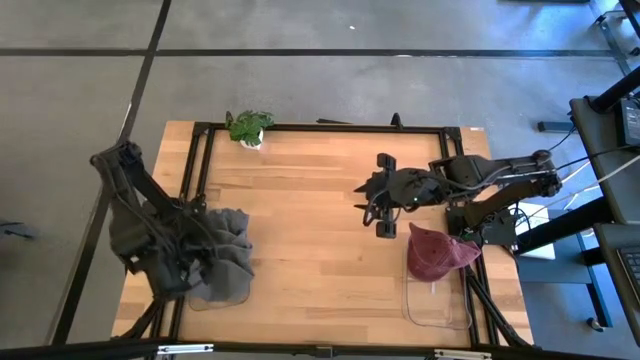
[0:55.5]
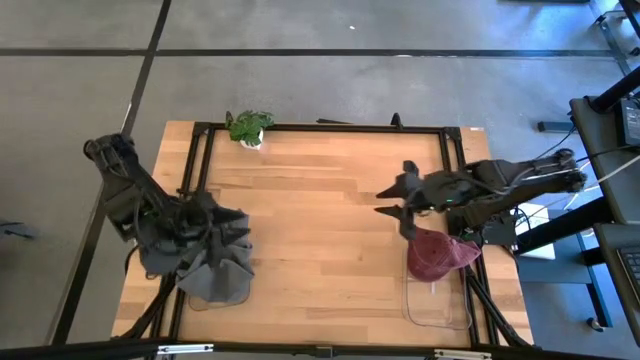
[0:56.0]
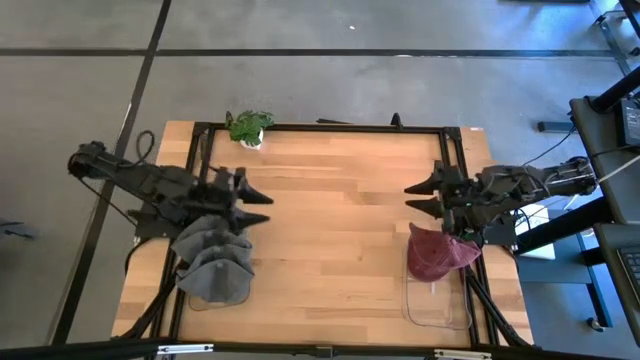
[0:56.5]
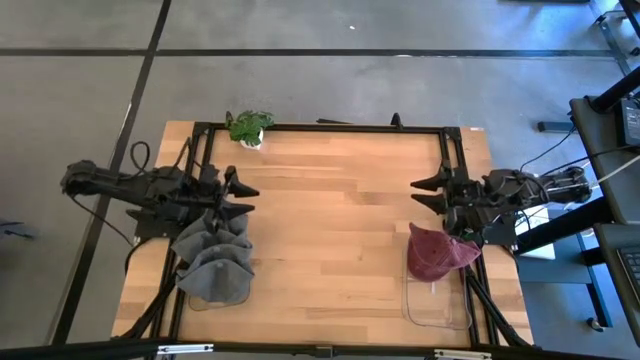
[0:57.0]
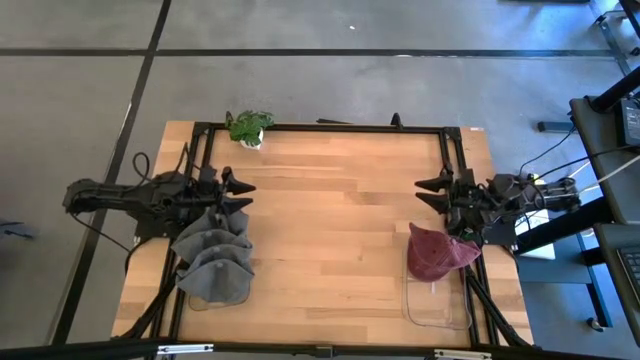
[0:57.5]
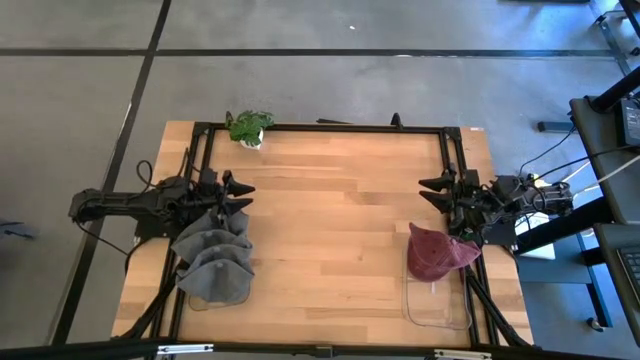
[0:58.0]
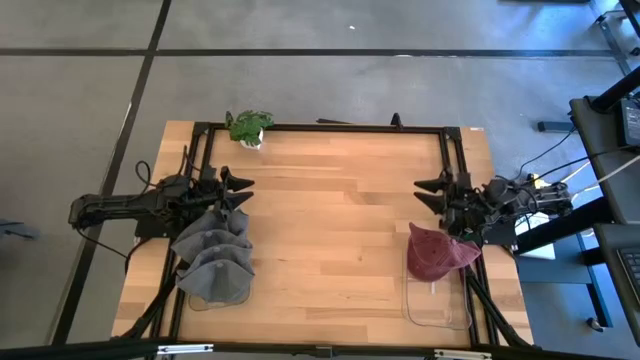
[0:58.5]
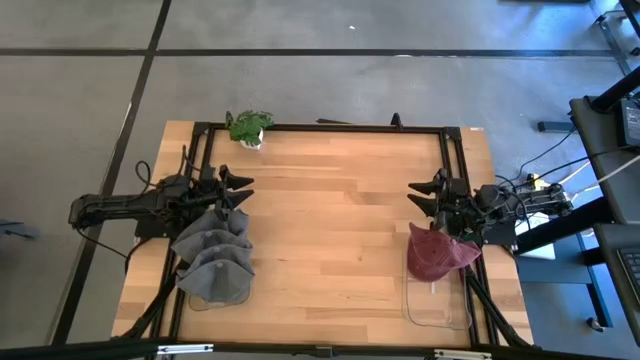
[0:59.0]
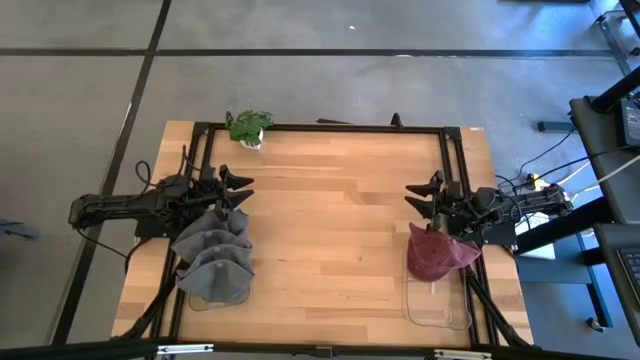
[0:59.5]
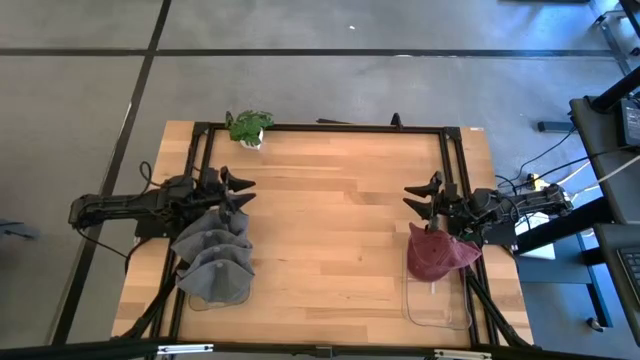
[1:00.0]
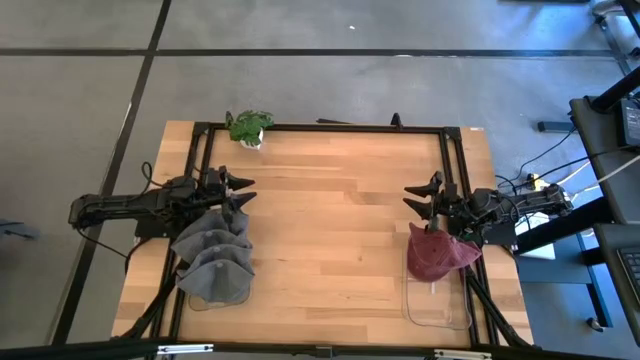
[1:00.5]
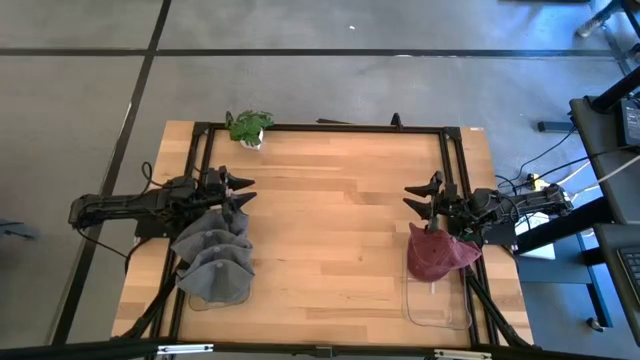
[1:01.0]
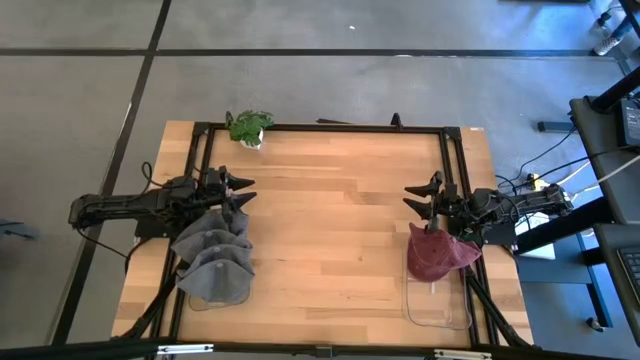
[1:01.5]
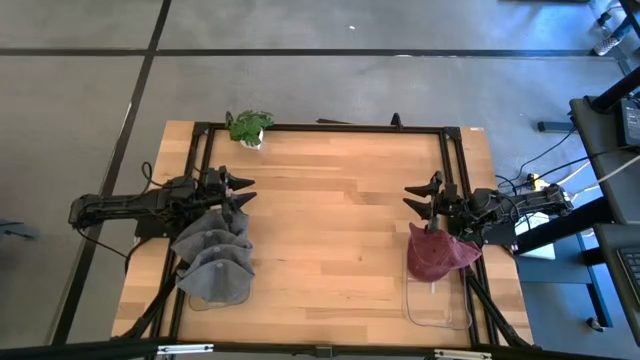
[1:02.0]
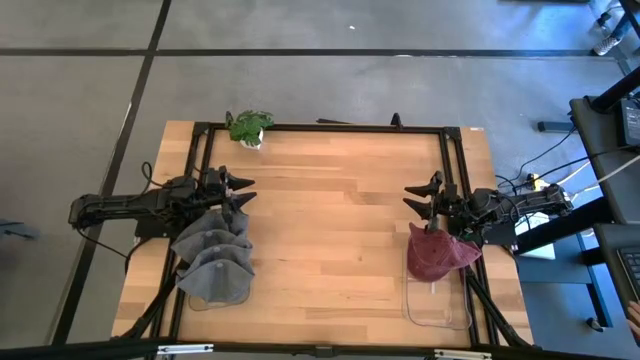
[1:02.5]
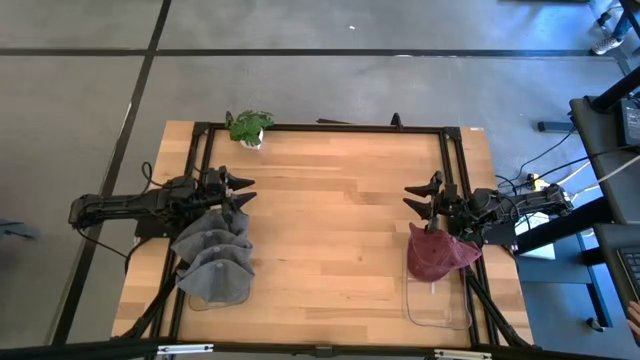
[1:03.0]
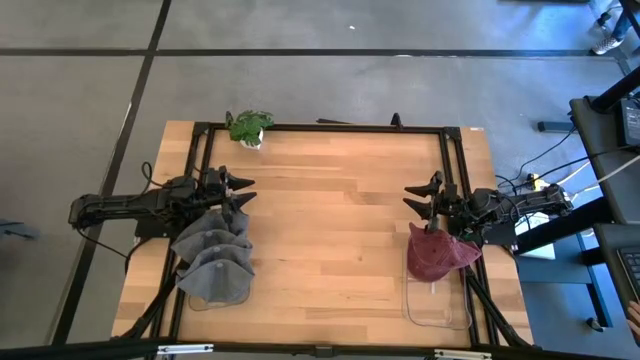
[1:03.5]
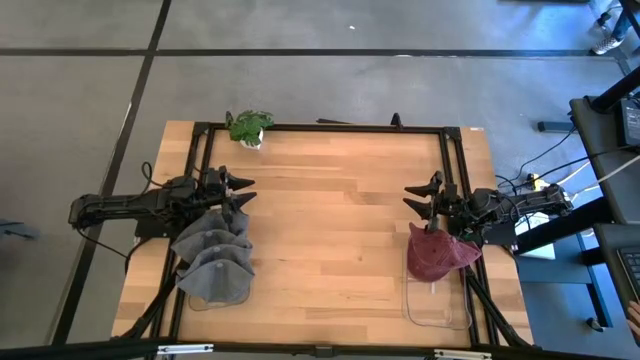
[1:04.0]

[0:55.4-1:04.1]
Task: Pick & Place hat
Return to Home Position

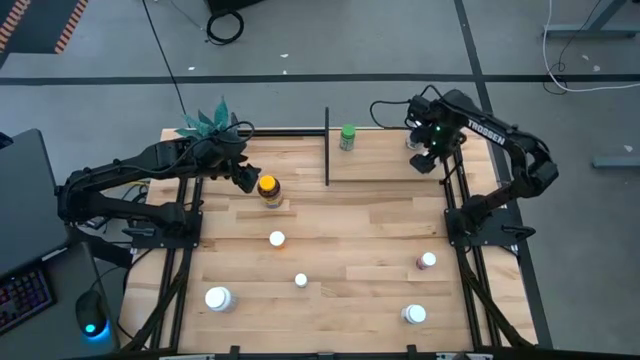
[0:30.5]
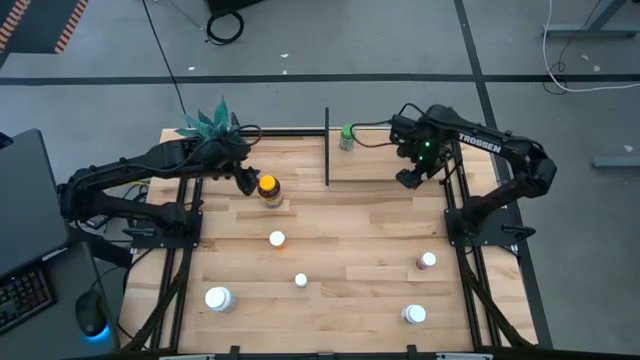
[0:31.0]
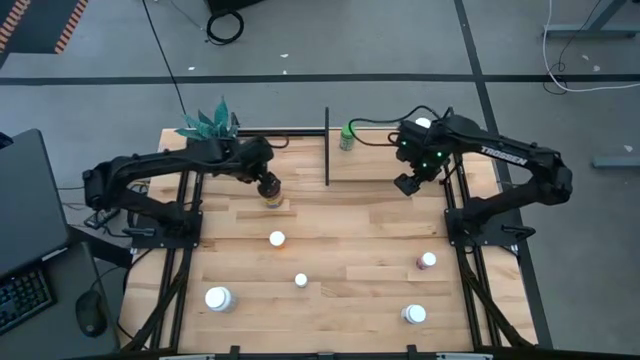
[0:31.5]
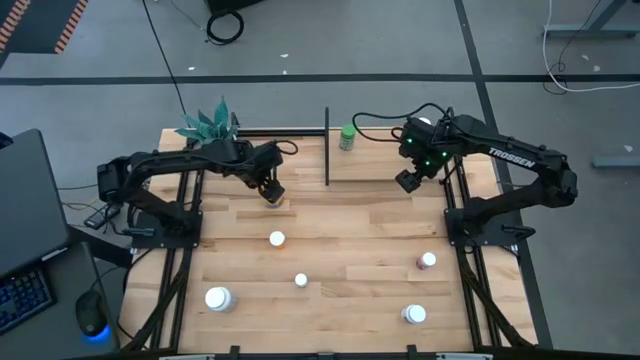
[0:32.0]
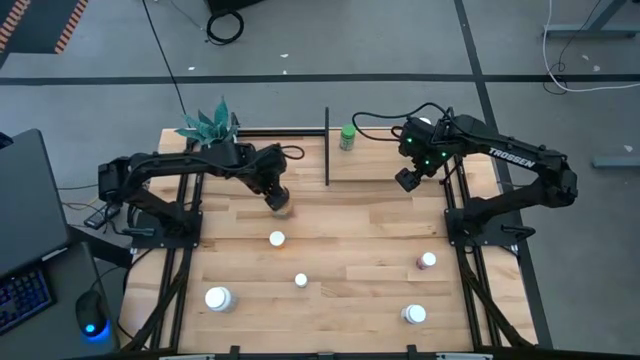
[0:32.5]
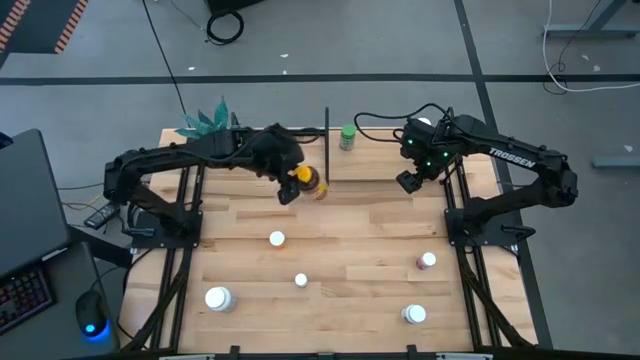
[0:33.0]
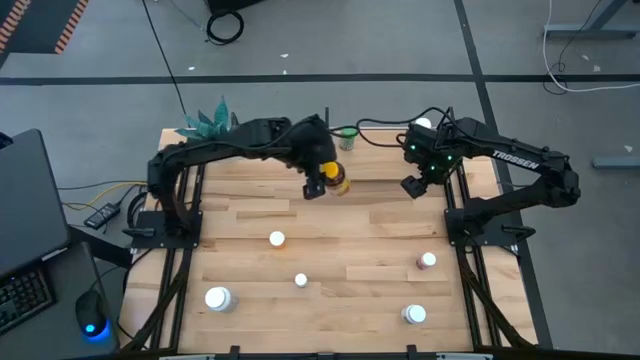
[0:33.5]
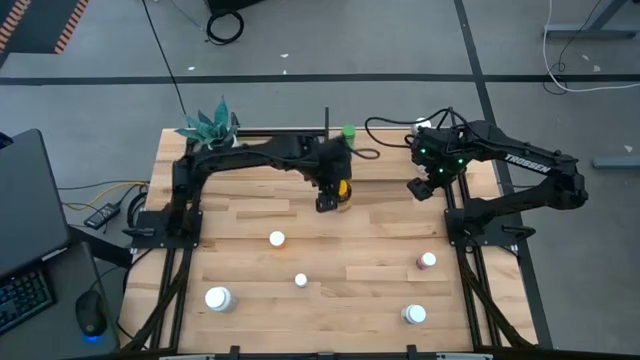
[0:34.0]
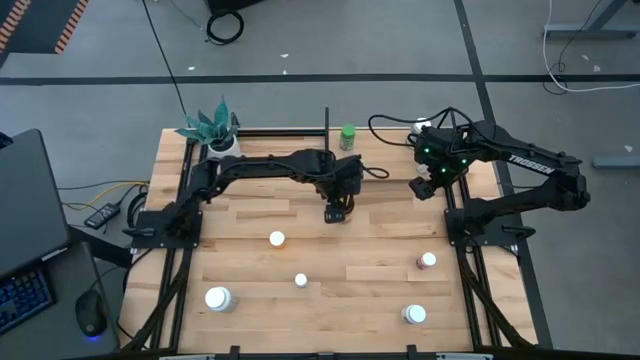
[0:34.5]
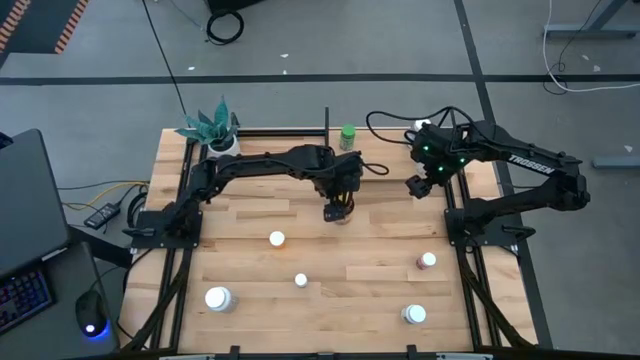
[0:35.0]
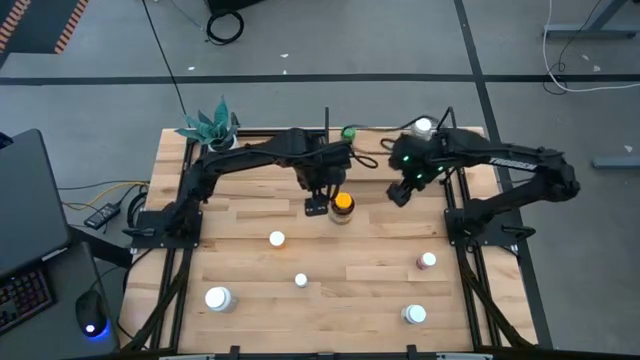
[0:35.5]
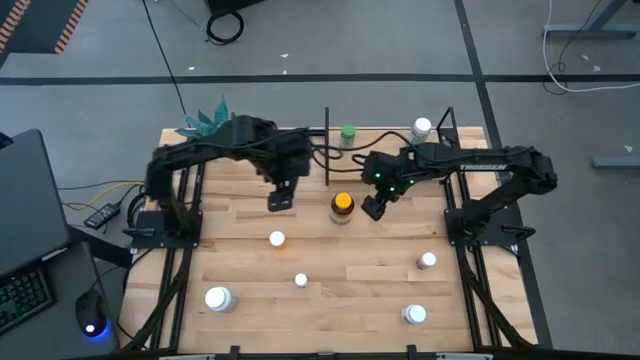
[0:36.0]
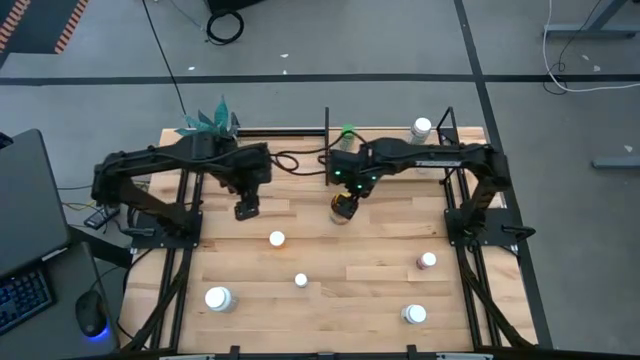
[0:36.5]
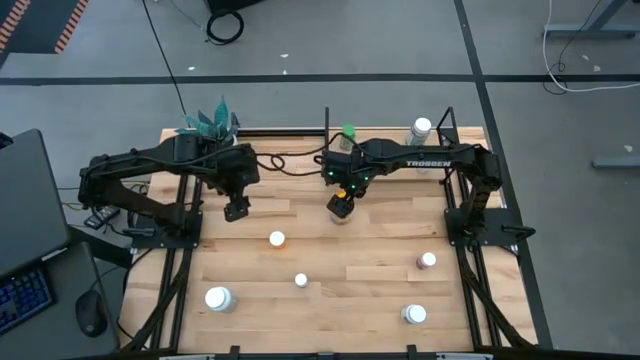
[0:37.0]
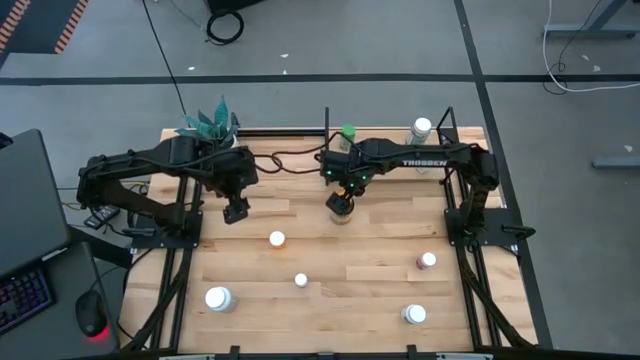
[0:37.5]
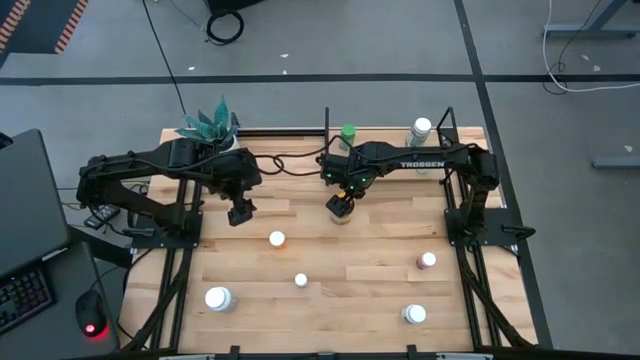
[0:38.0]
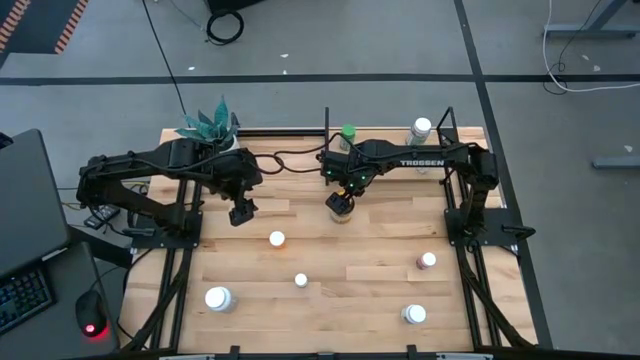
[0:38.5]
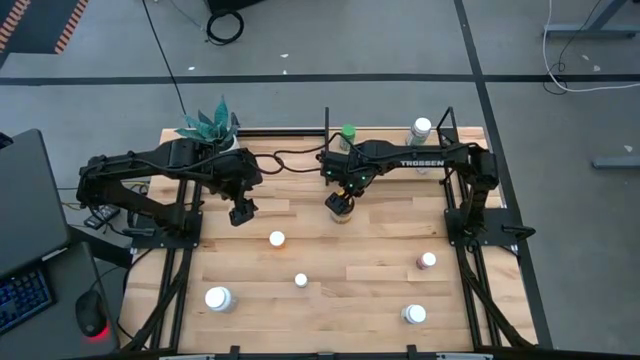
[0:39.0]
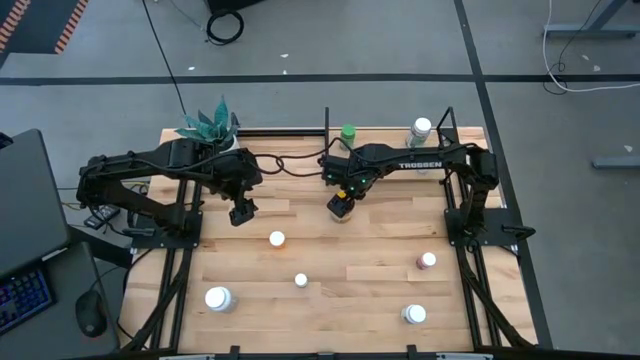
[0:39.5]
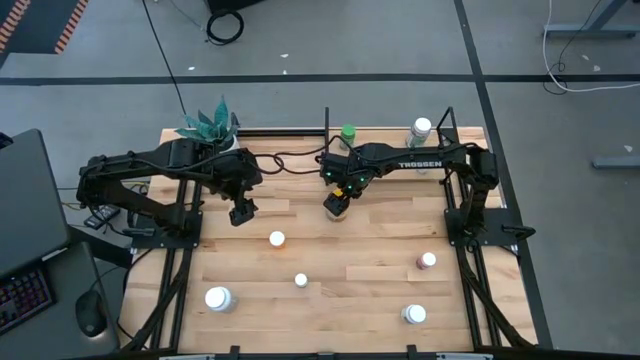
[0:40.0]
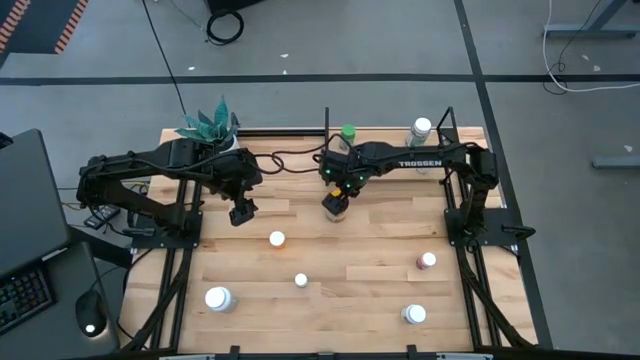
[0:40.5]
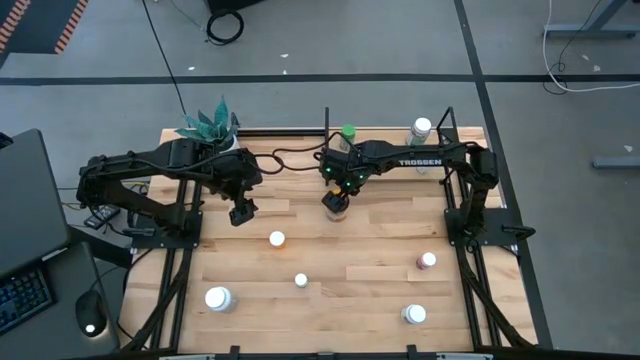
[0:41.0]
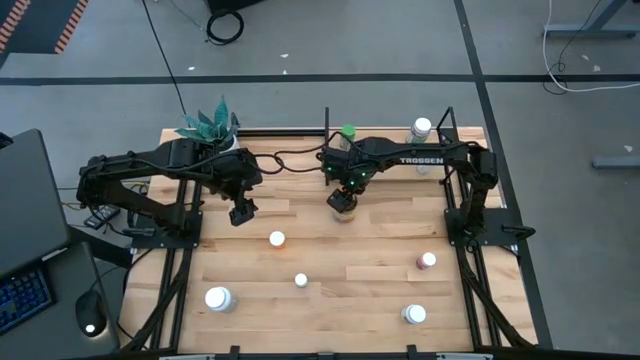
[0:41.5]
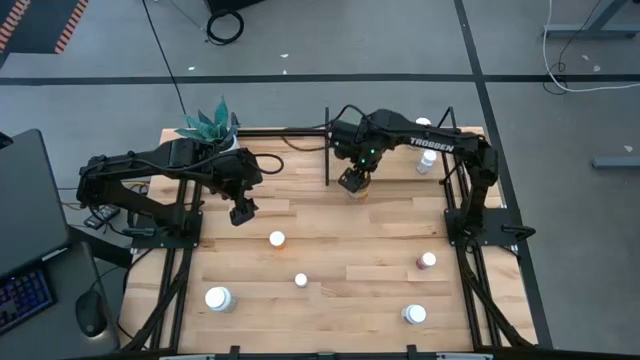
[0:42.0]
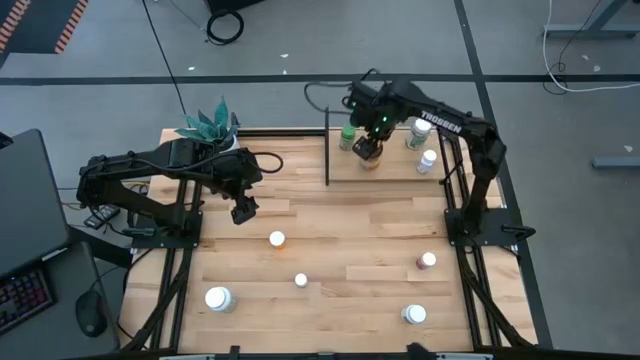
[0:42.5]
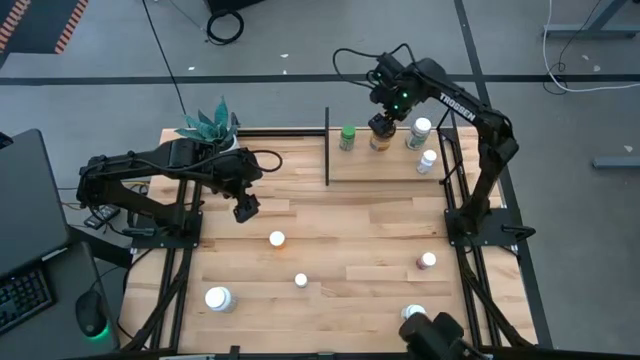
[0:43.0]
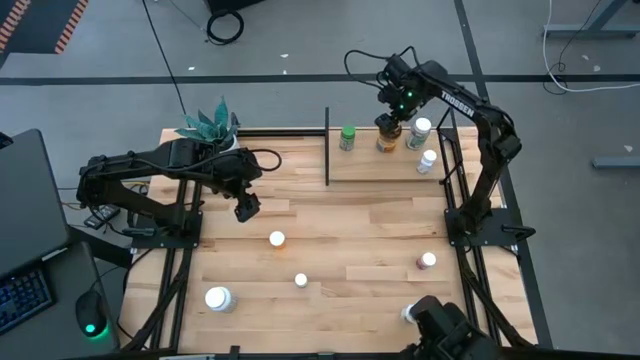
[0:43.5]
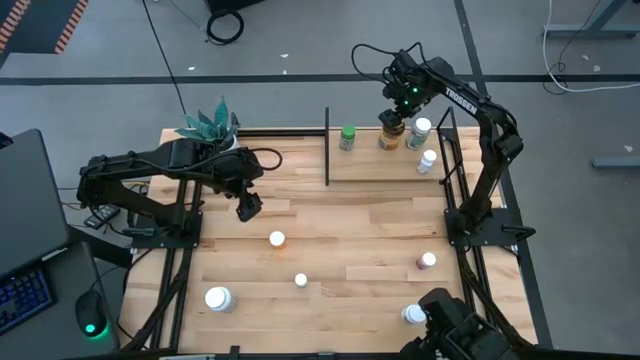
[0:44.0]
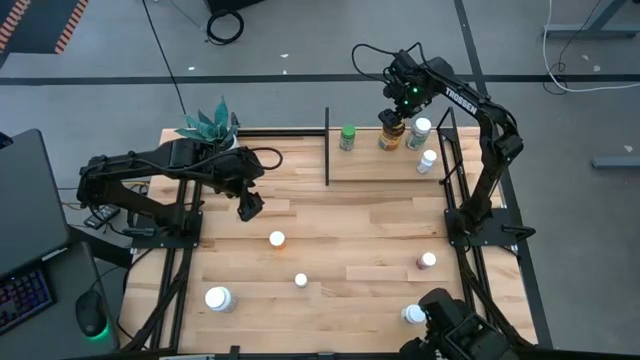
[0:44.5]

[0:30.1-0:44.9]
Task: Pick and place medicine bottles onto shelf by color
Put the yellow pill bottle on the shelf
